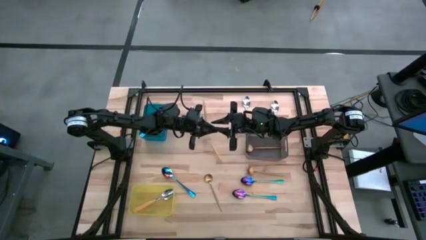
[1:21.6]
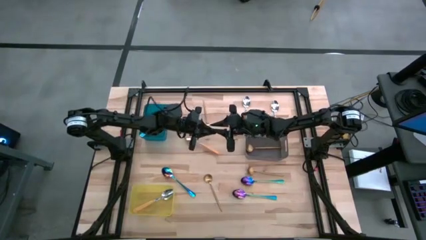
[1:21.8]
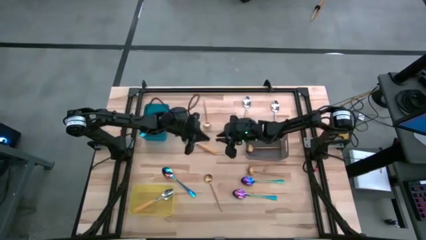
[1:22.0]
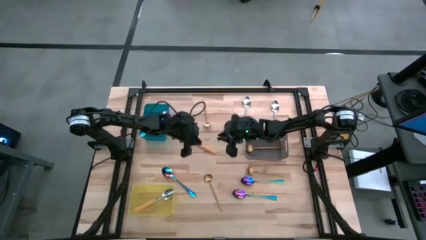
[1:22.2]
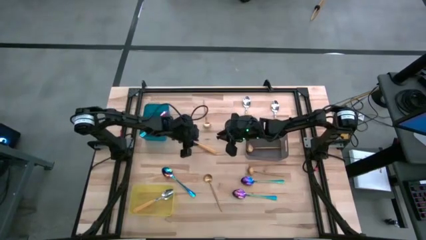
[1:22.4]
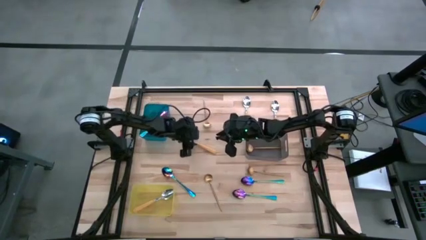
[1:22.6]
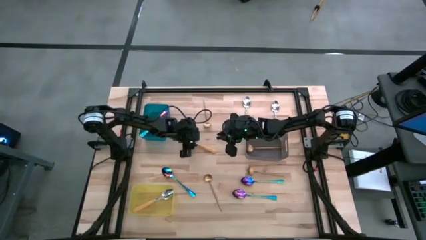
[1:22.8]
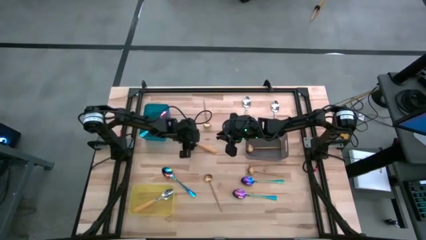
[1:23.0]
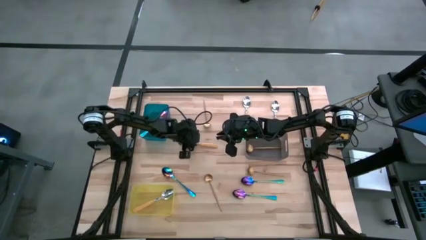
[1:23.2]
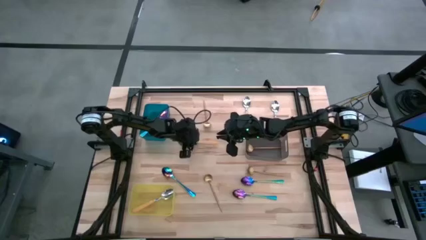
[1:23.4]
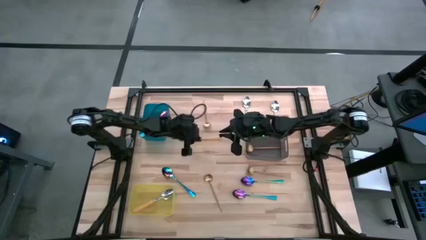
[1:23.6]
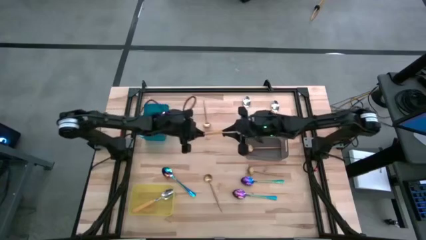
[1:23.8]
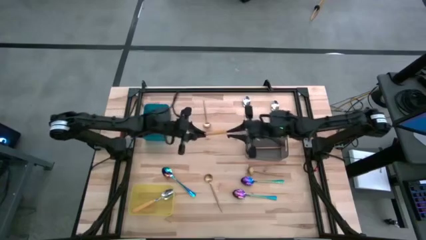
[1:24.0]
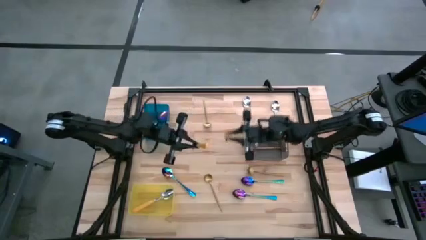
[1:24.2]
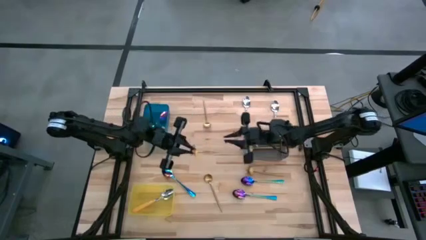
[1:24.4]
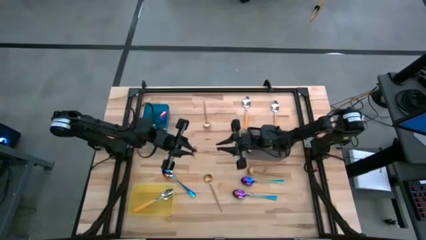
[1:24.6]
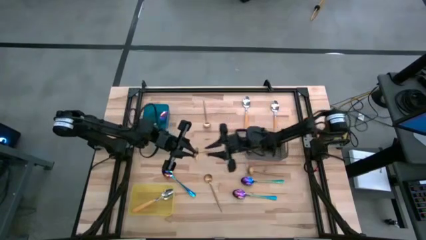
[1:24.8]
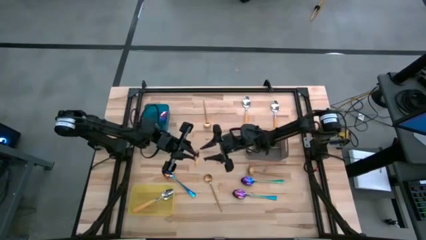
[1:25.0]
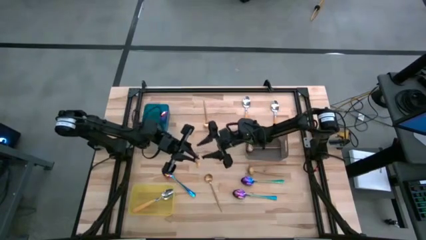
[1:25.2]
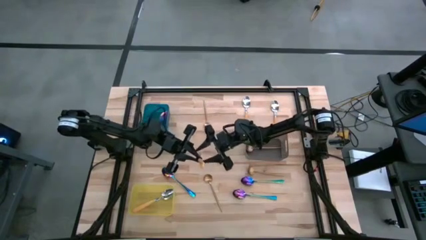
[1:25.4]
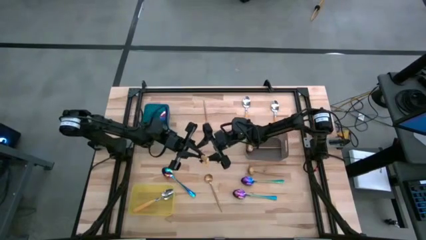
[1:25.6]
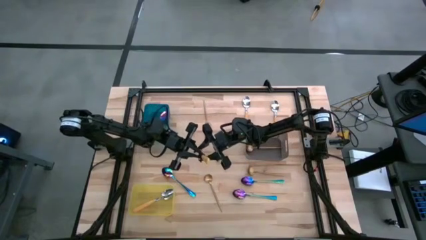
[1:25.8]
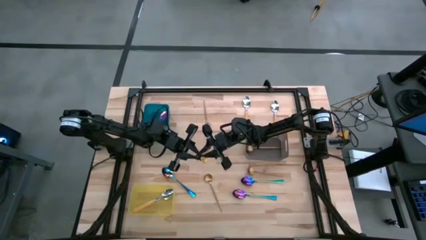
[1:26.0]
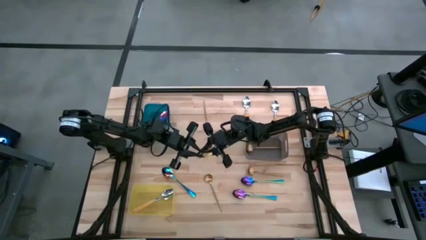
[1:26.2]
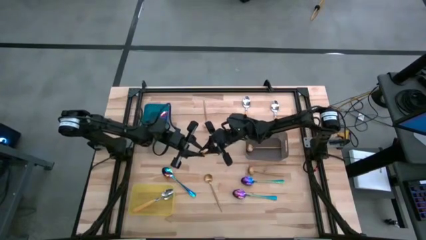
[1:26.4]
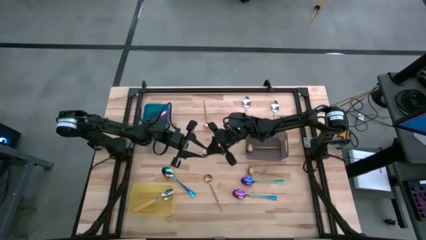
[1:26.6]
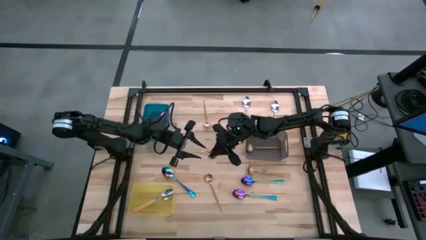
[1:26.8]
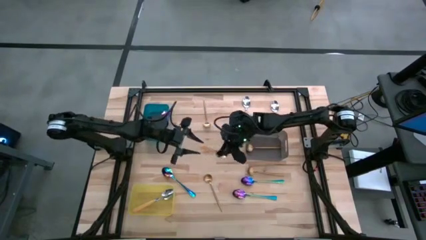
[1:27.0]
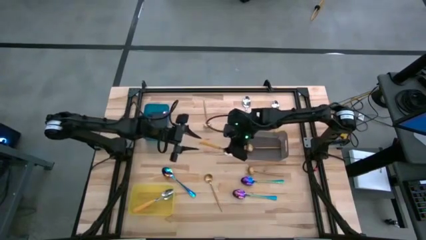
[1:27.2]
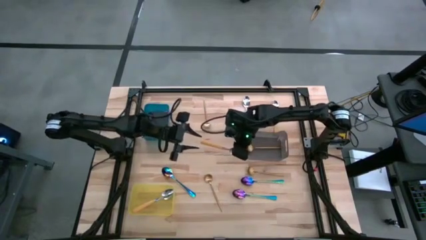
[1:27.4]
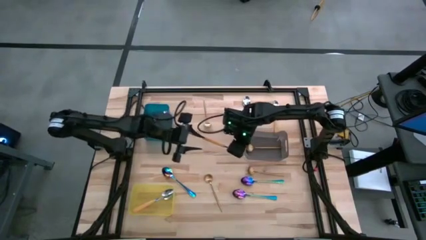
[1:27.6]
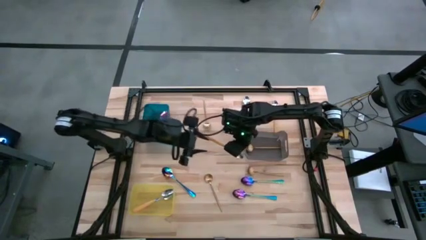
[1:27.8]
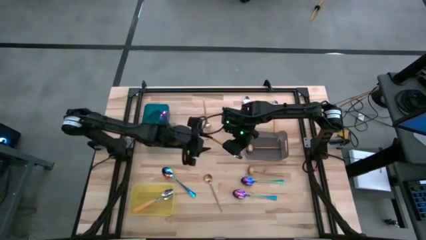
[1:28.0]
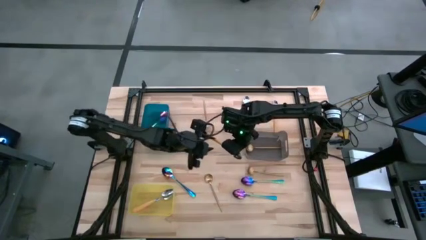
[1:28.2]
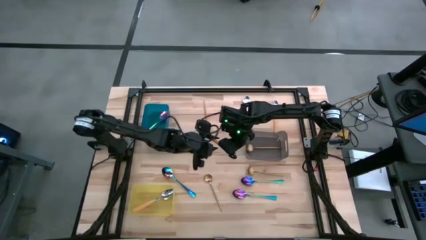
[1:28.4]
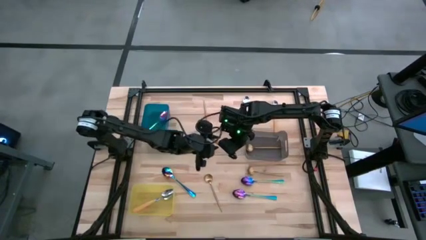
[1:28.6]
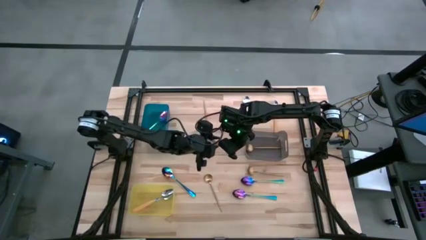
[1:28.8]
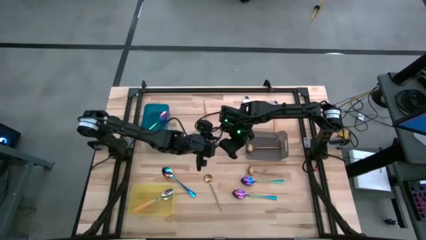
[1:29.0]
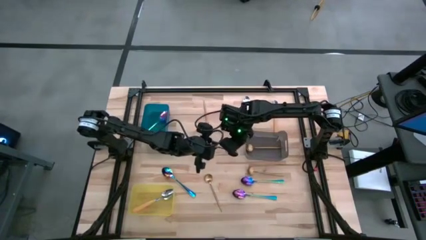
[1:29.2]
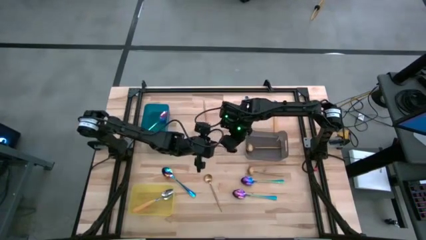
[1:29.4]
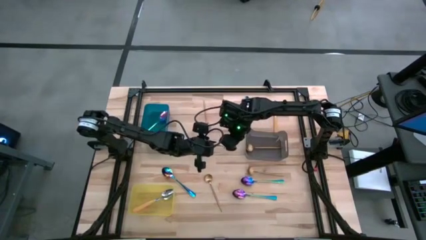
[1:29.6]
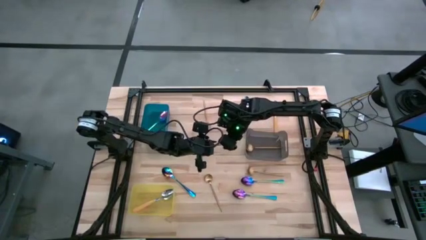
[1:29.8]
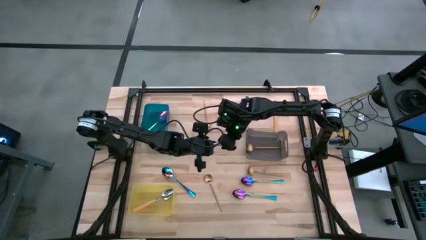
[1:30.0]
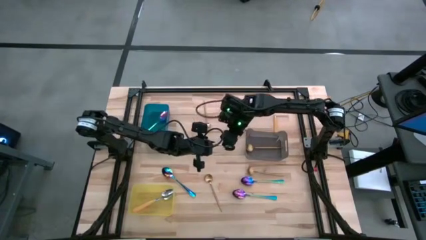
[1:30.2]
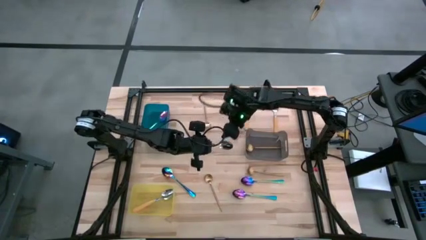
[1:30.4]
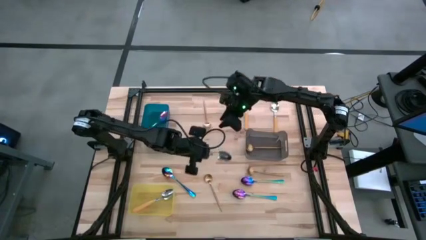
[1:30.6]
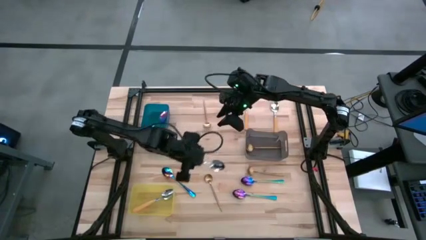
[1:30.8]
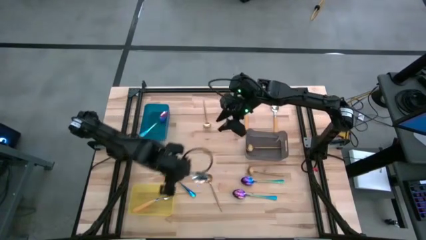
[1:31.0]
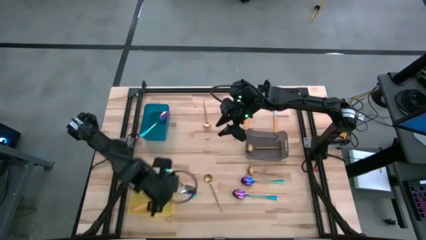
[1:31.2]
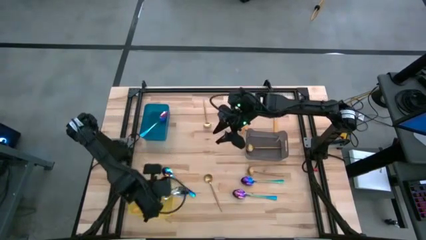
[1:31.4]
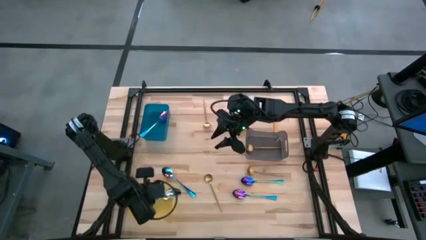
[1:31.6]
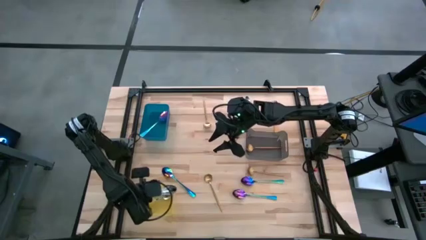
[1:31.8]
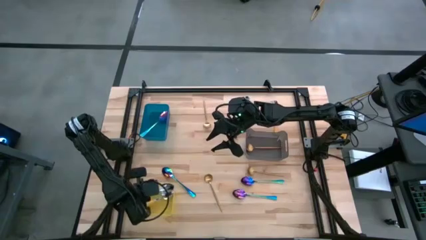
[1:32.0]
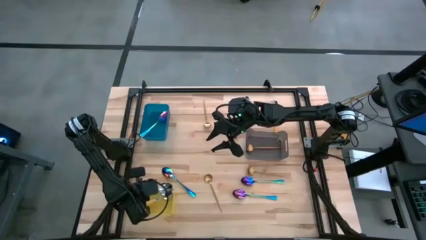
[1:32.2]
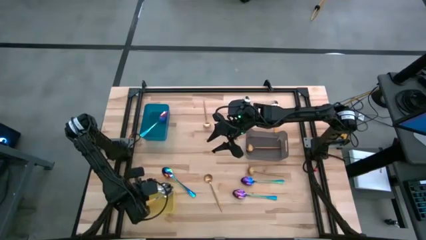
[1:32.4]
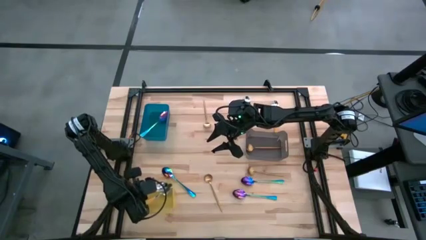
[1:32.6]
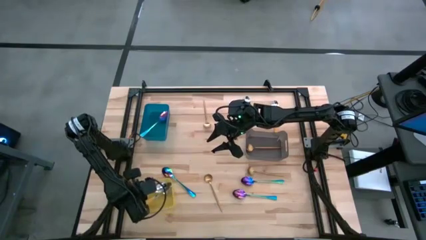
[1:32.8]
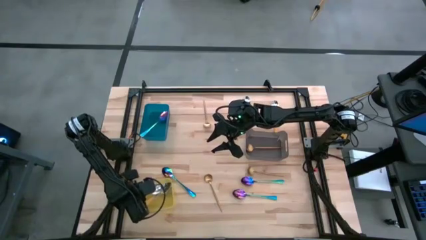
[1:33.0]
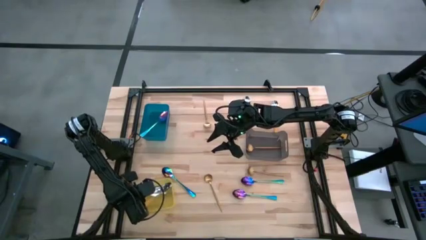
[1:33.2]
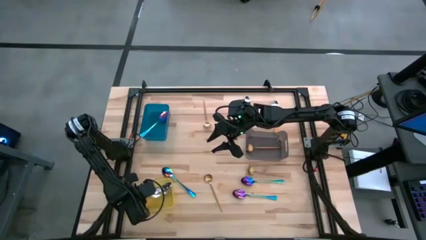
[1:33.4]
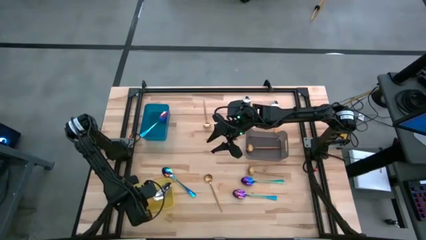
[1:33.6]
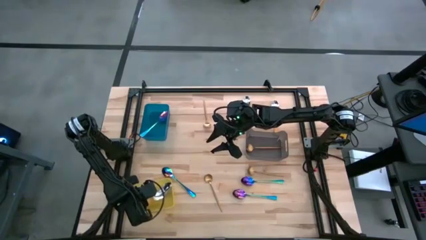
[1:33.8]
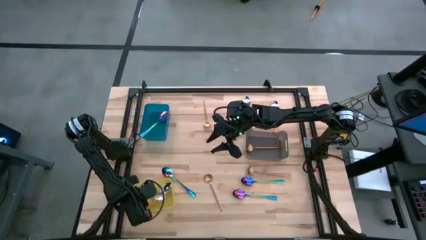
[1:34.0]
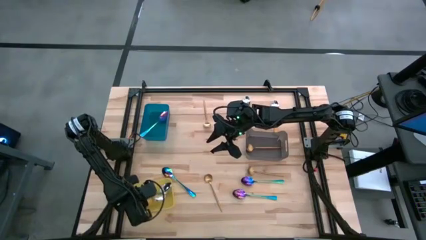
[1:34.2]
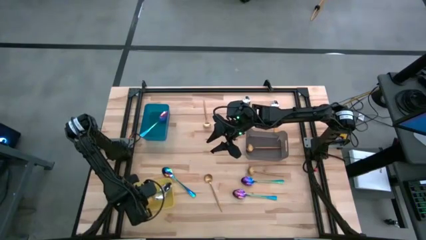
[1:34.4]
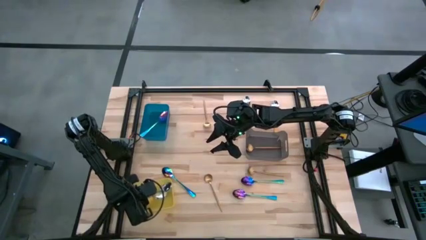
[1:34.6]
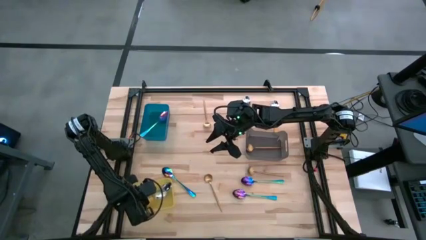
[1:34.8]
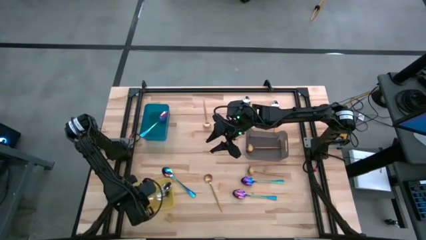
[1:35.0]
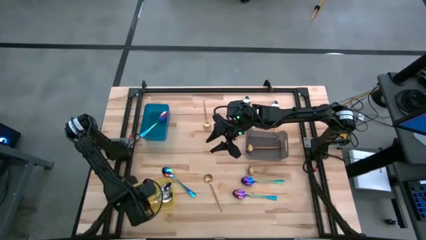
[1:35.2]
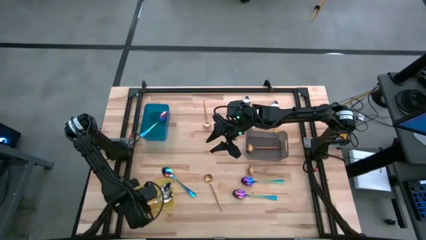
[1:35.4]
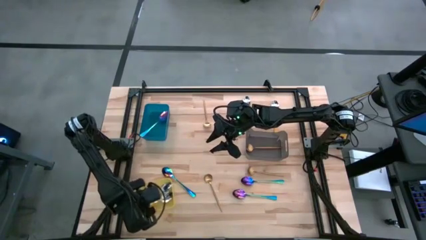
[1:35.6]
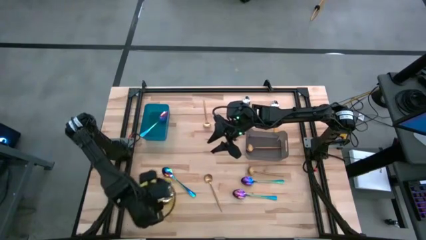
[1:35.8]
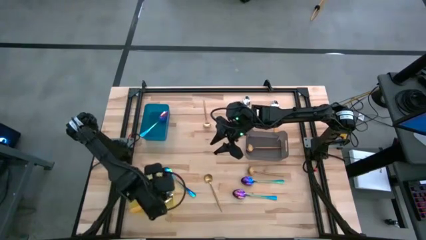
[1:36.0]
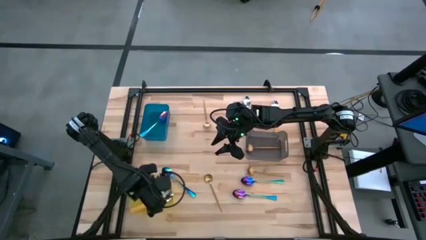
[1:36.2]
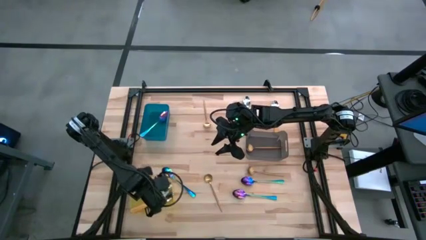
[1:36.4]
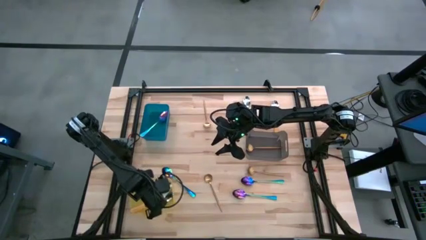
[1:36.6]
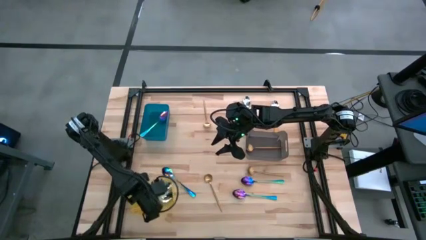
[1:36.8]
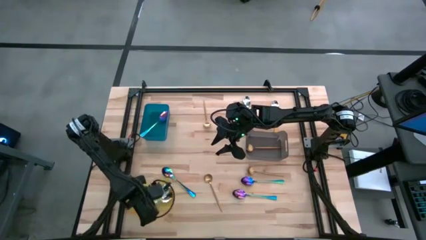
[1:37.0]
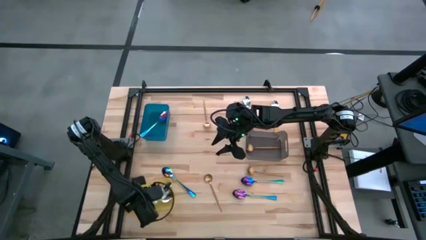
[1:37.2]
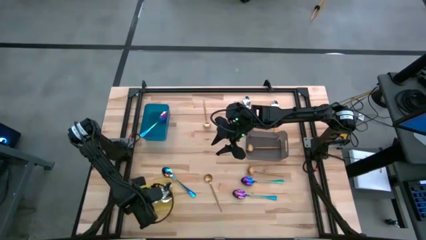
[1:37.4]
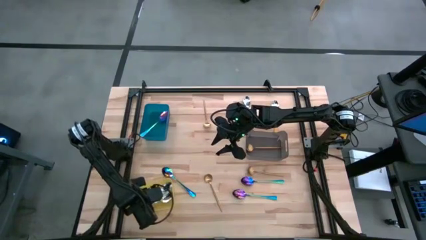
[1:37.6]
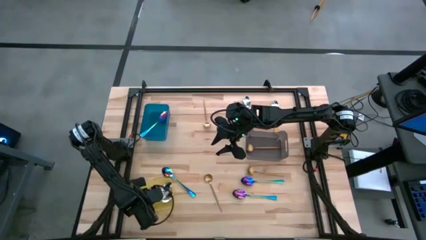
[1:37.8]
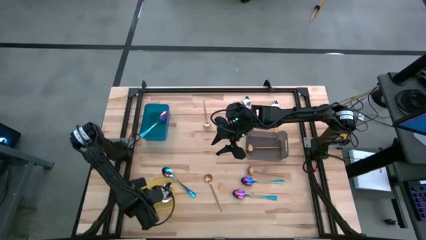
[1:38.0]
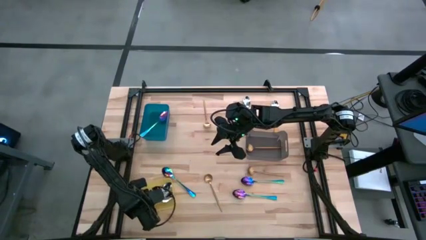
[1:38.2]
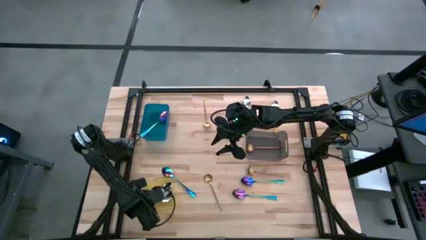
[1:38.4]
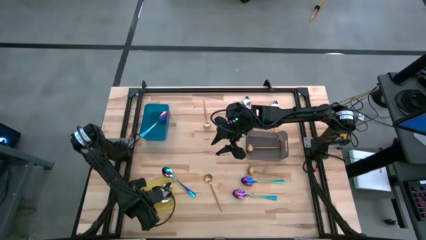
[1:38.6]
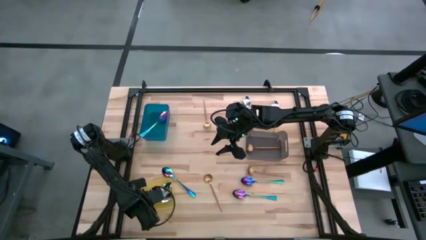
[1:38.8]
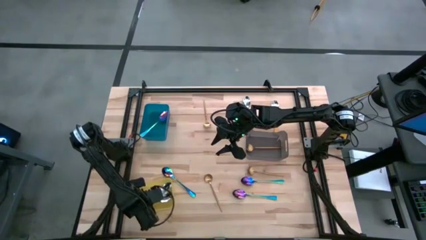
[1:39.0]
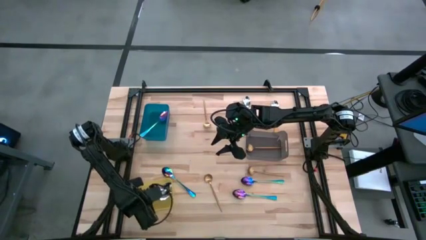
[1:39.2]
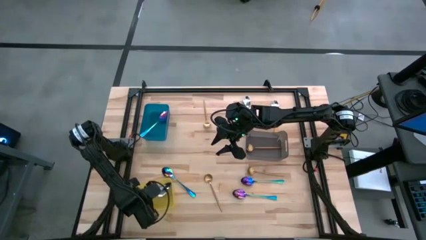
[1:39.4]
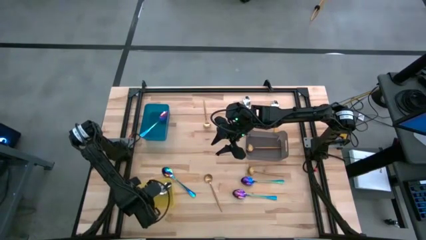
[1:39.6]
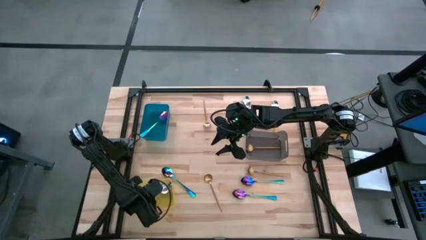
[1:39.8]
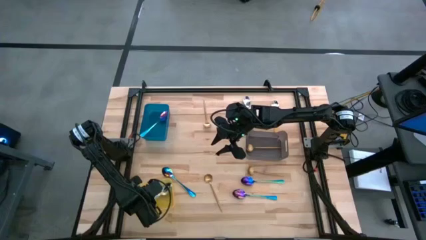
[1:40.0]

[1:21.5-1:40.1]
Task: Sort silverware by color (type)
Put the yellow spoon into the yellow bin
